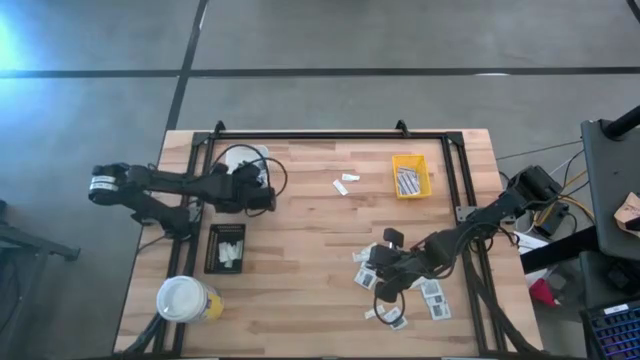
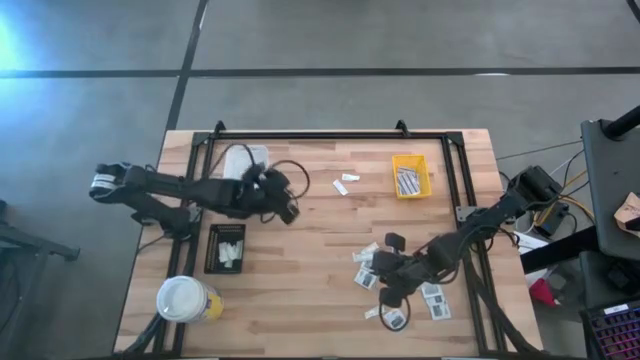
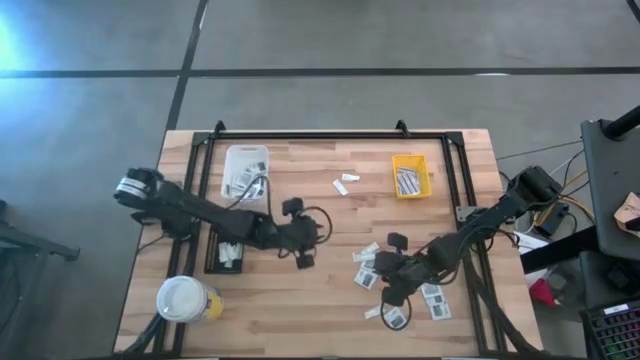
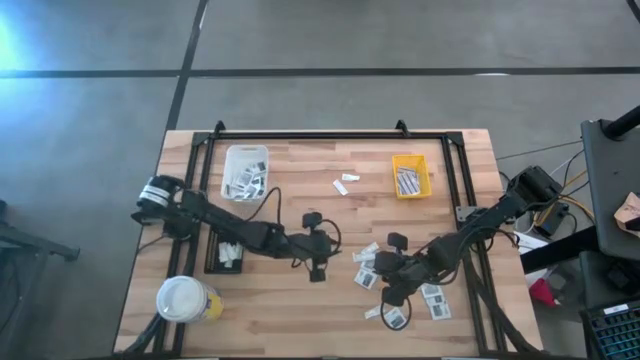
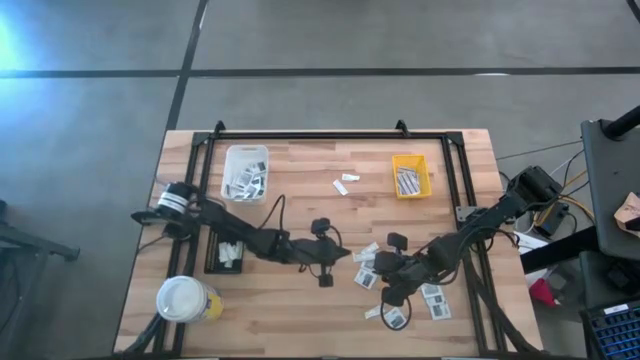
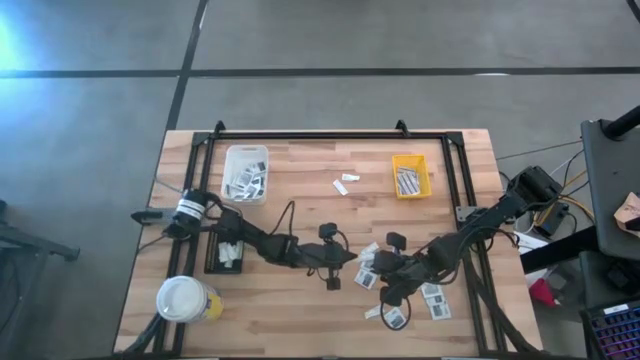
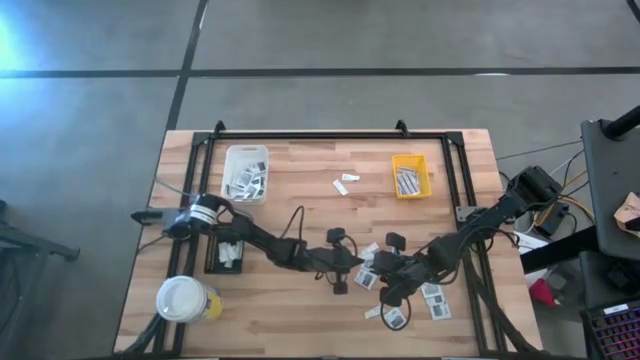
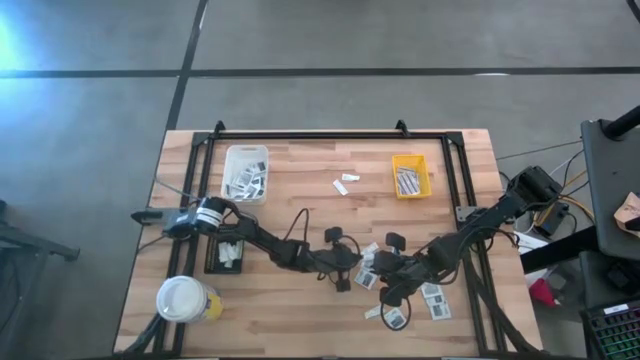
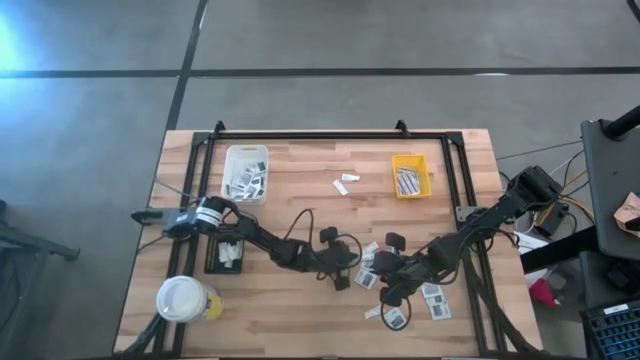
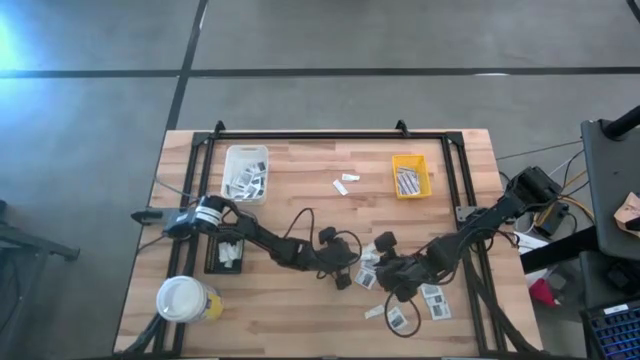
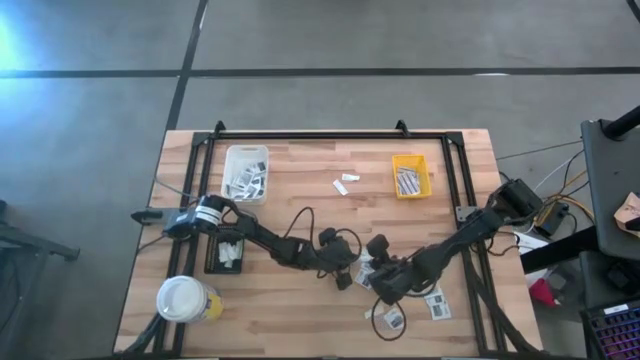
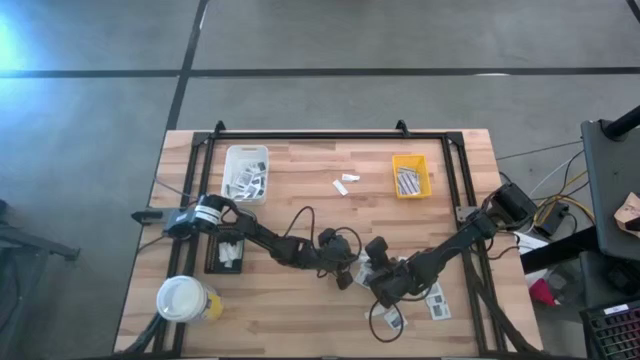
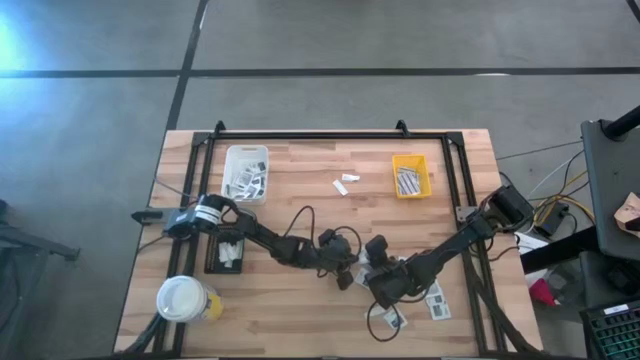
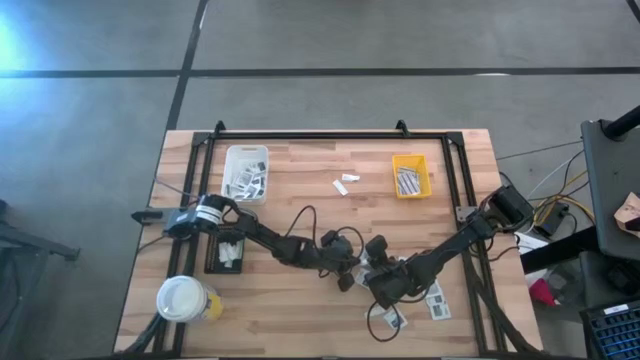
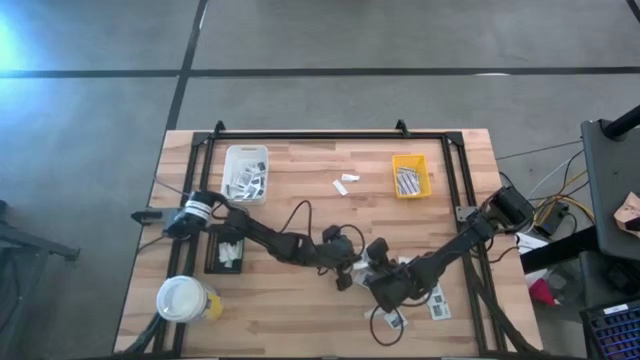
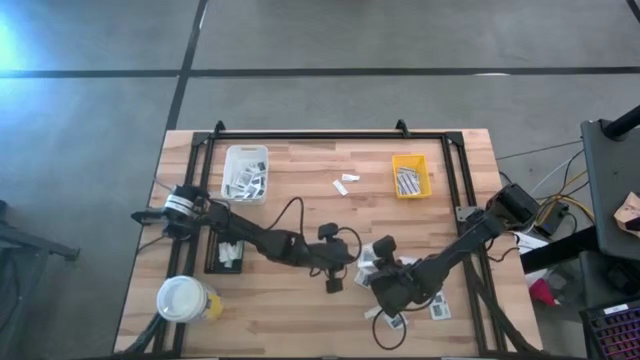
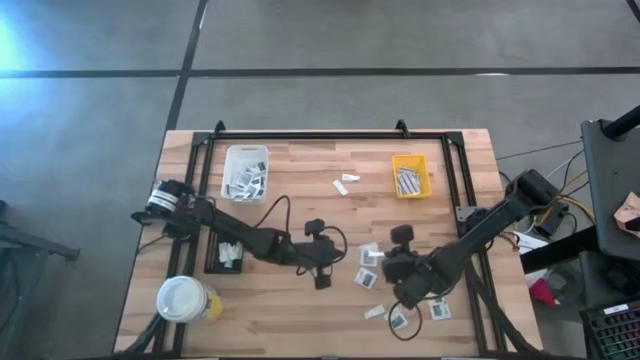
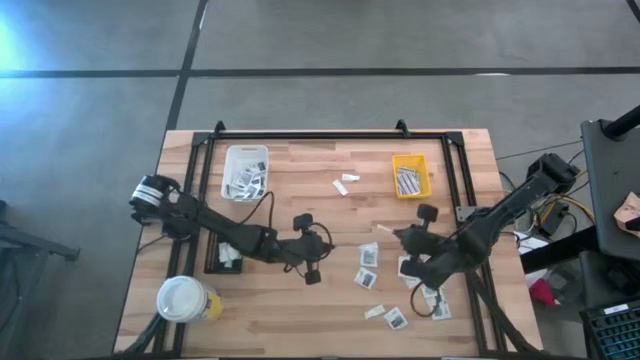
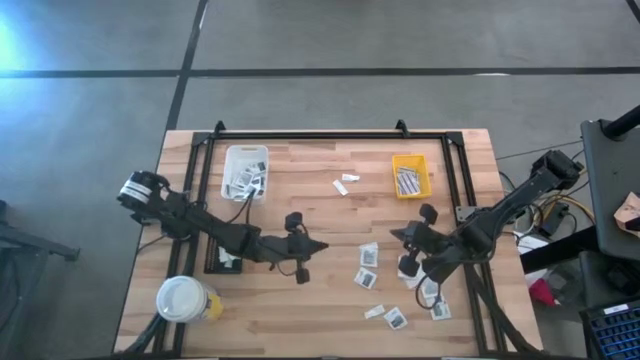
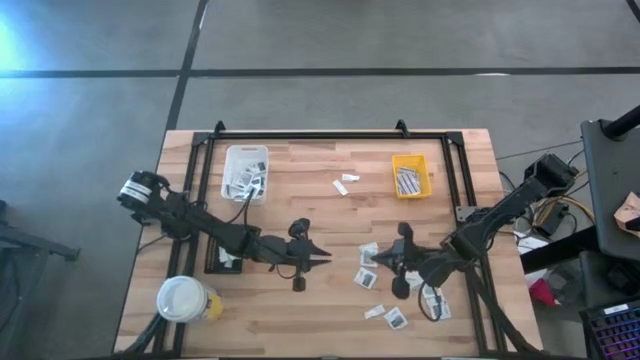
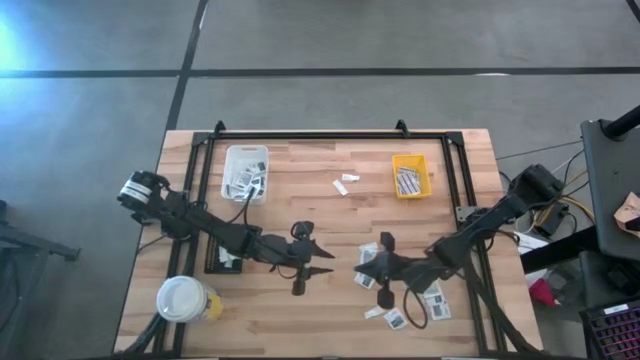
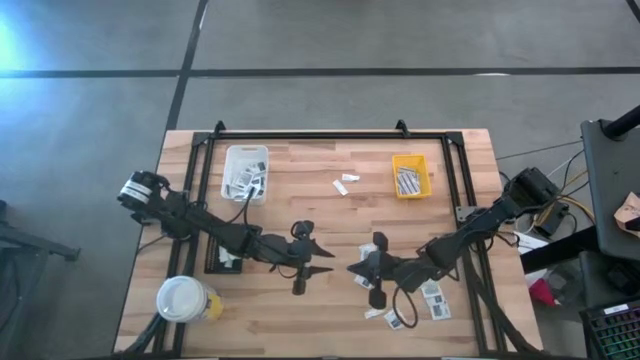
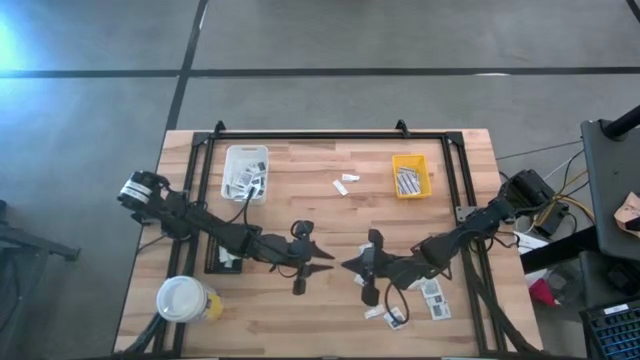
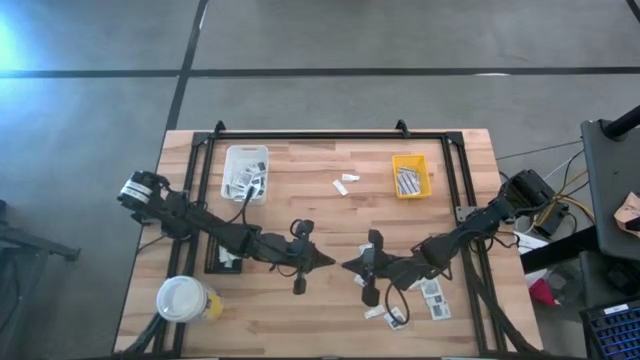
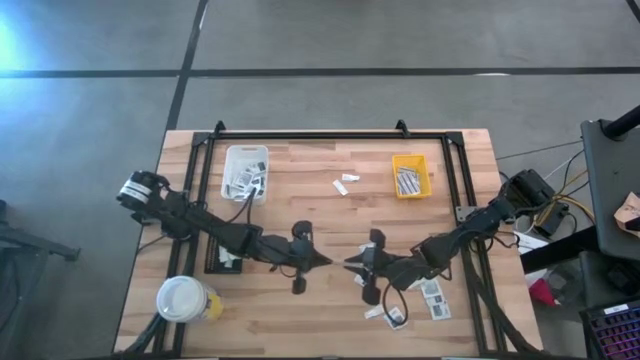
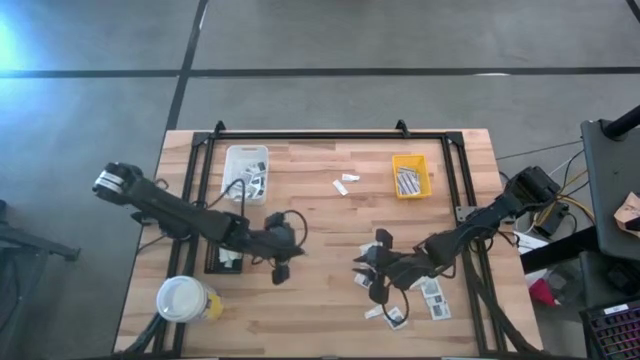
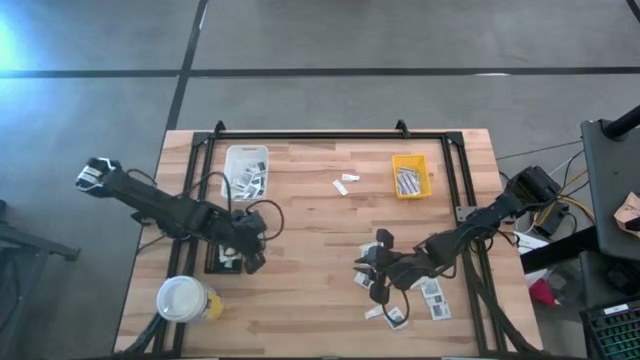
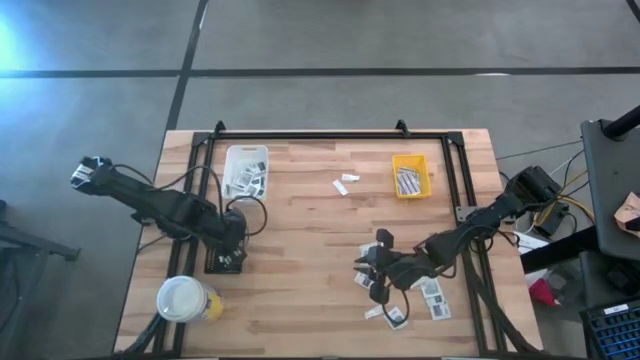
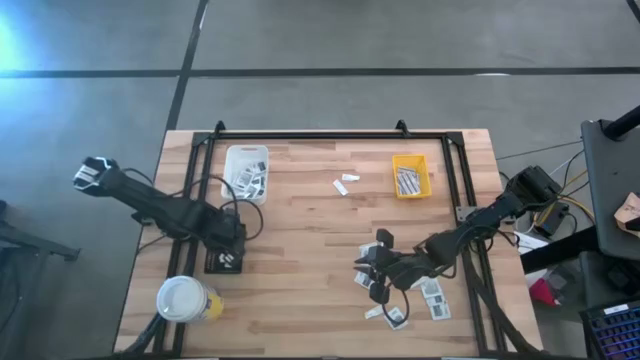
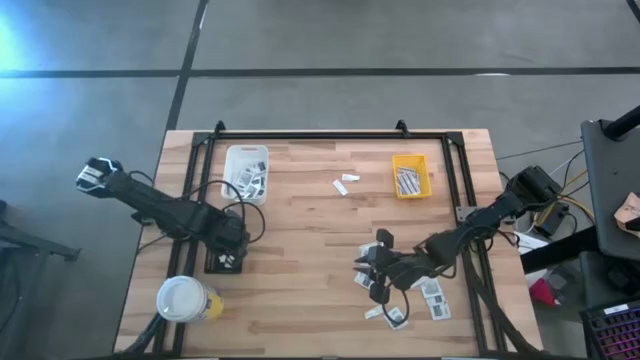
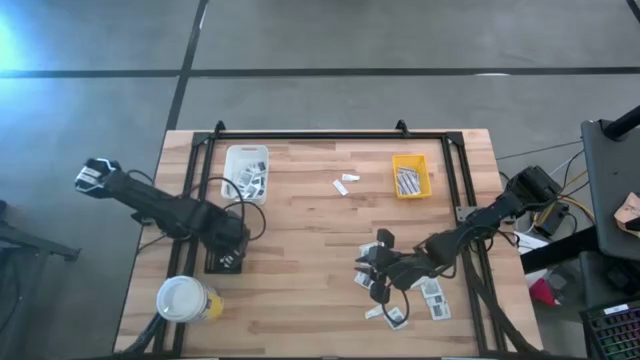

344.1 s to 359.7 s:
Task: Pick & Place First Aid Supplies
Put the green bandage pack into the black bin

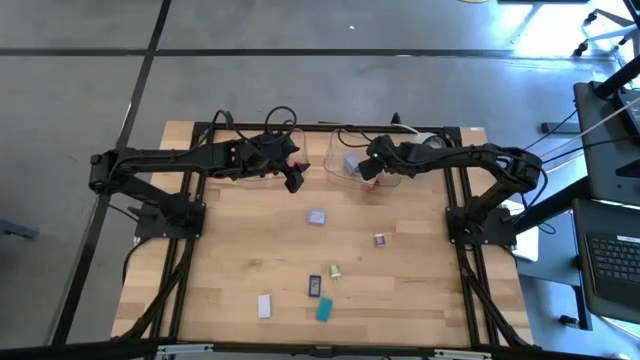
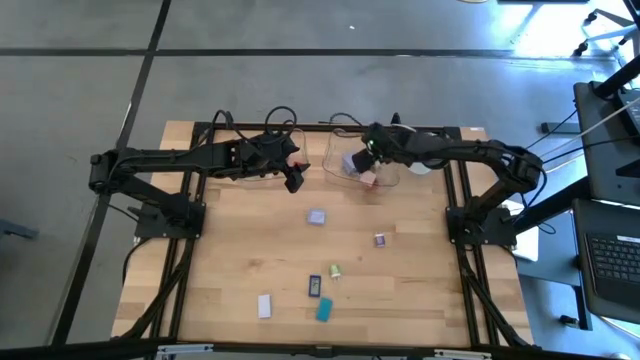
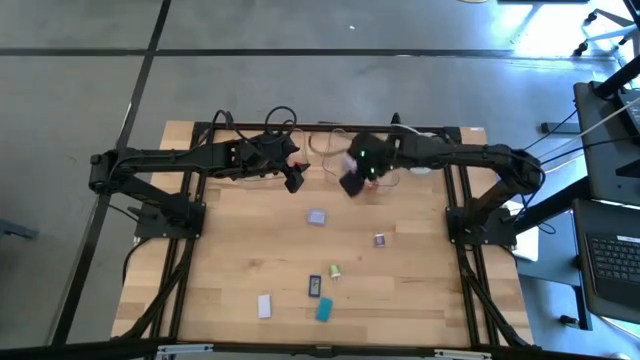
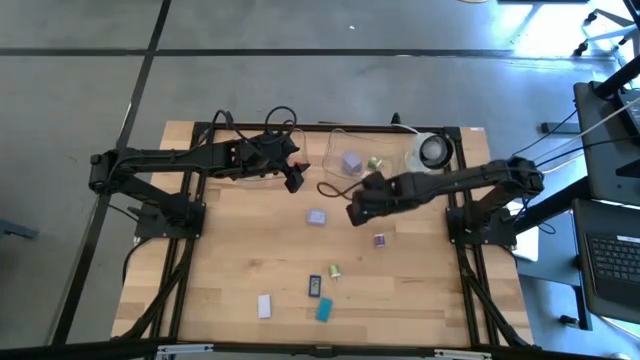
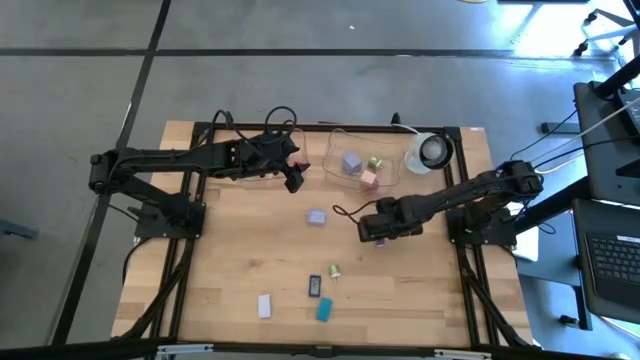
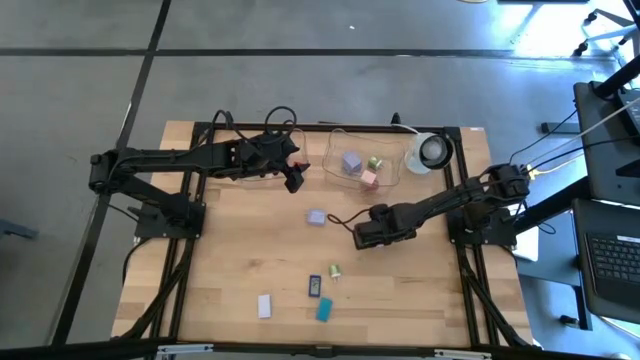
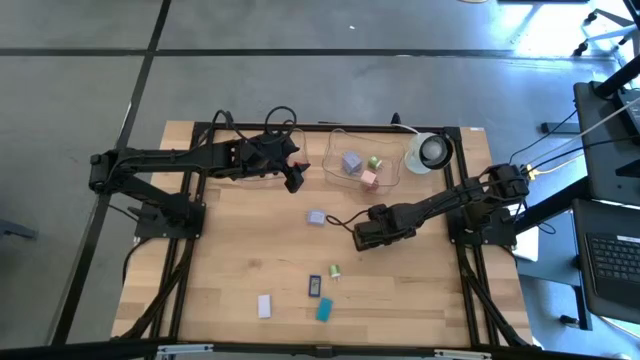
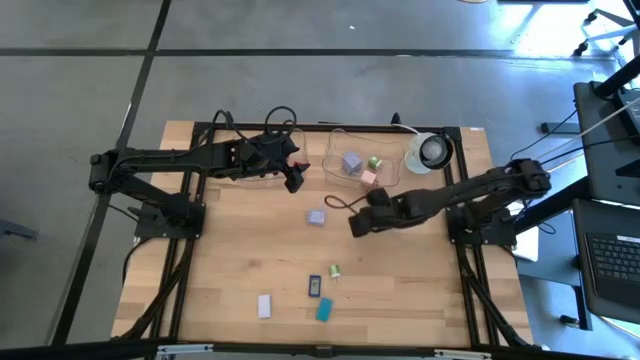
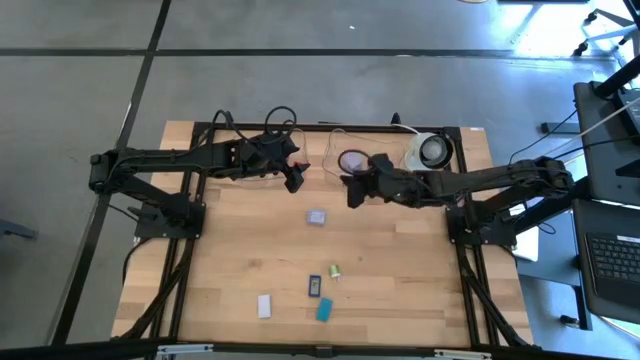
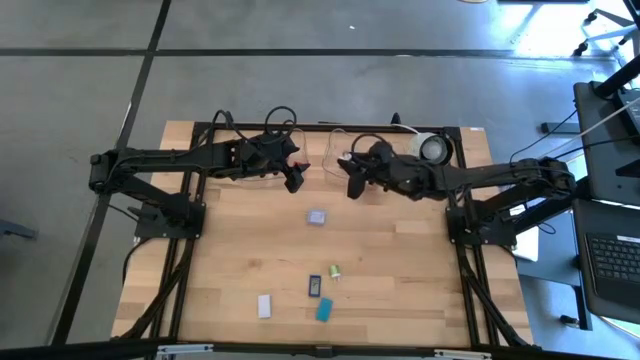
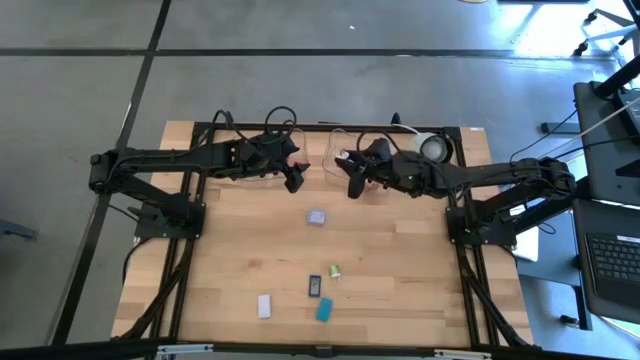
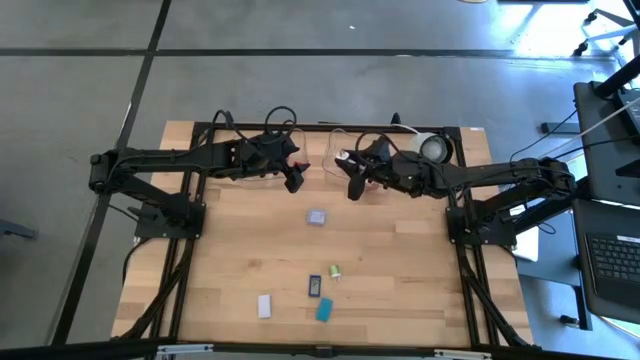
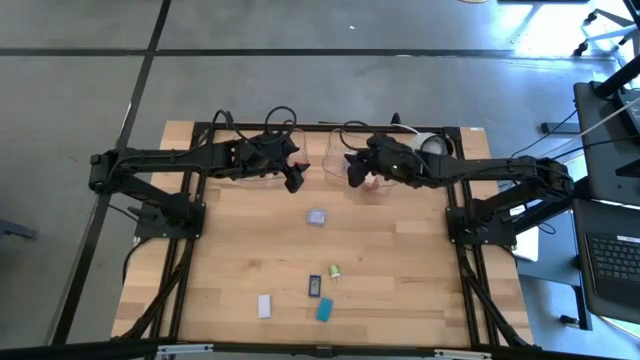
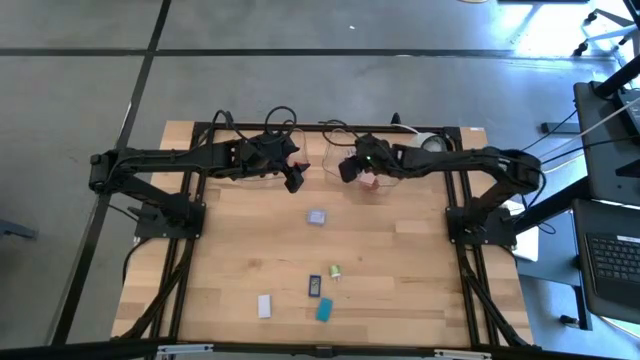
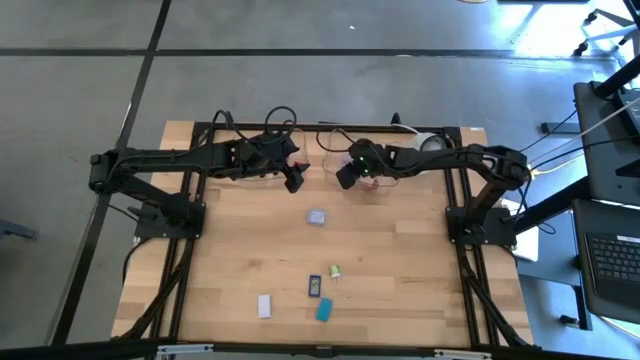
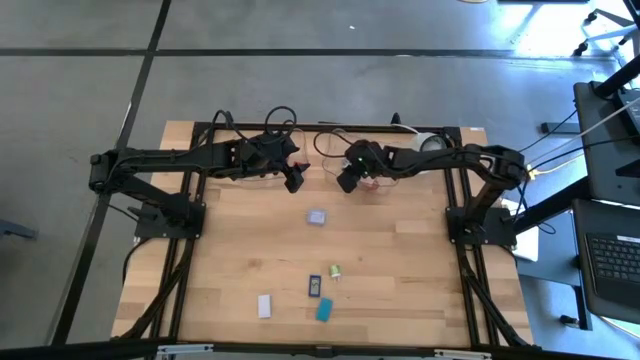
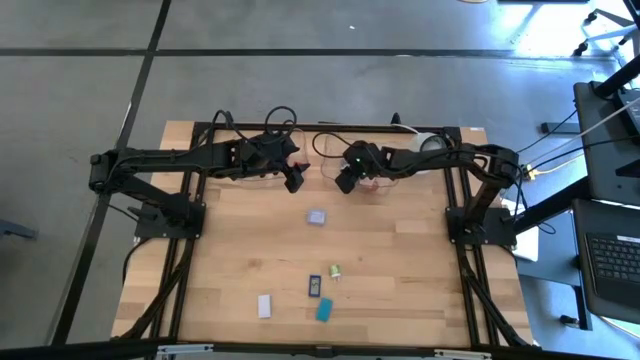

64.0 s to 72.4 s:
Task: Pick & Place Office items
Put the violet charger adapter into the right transparent bin
